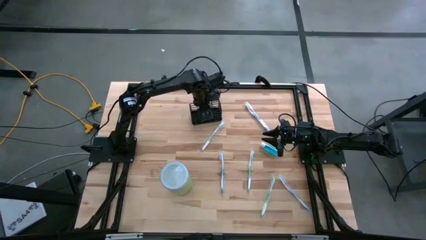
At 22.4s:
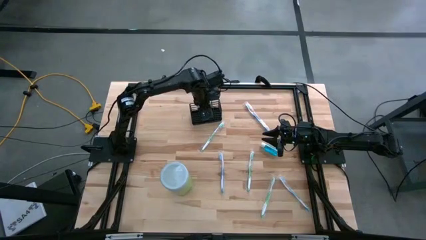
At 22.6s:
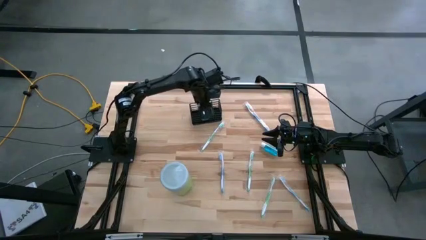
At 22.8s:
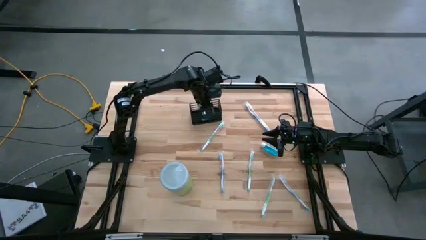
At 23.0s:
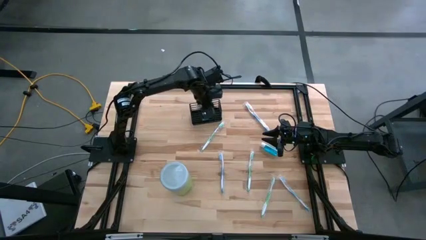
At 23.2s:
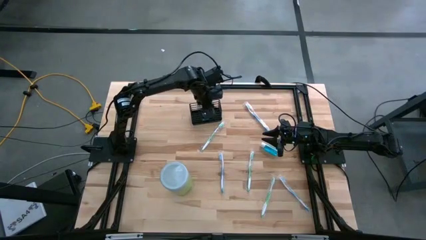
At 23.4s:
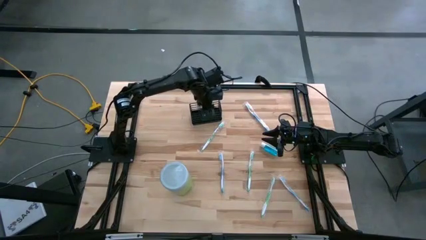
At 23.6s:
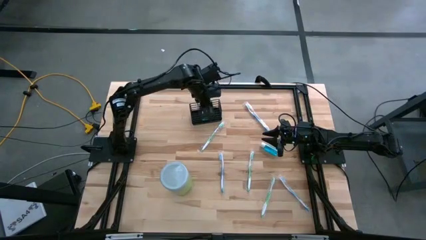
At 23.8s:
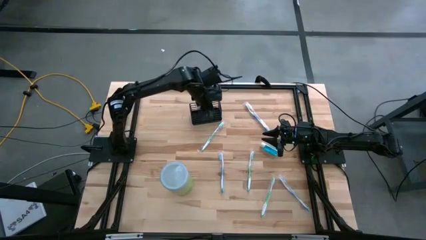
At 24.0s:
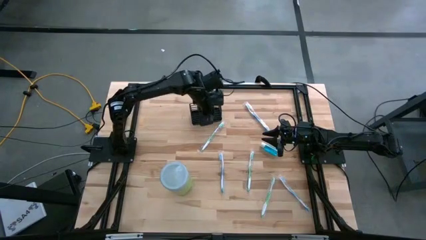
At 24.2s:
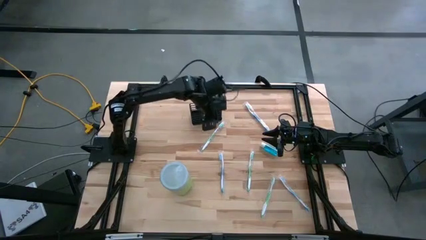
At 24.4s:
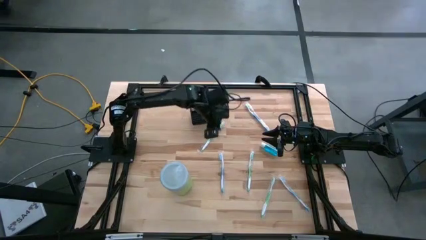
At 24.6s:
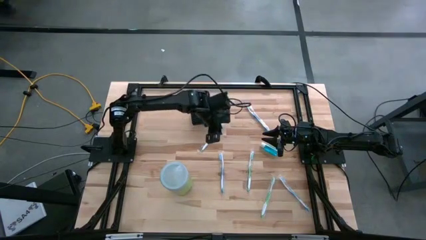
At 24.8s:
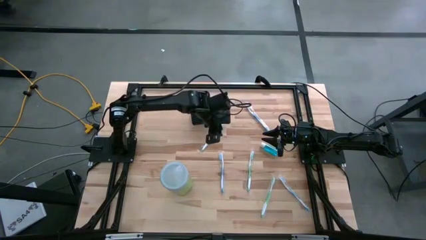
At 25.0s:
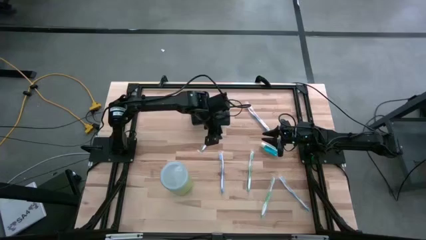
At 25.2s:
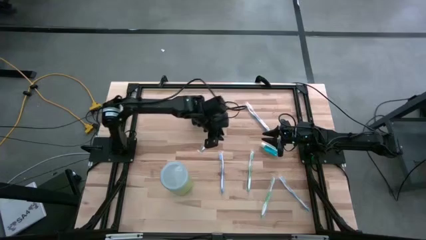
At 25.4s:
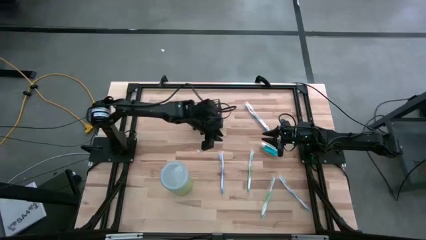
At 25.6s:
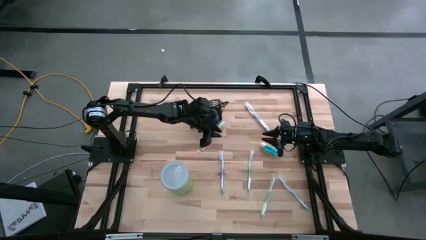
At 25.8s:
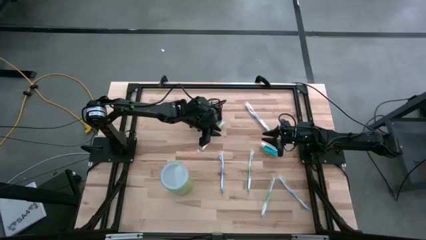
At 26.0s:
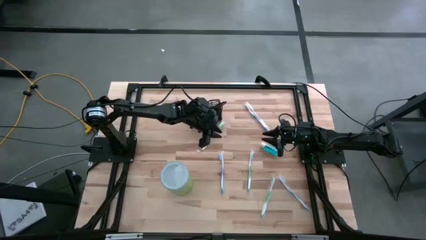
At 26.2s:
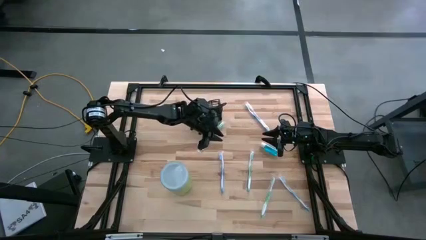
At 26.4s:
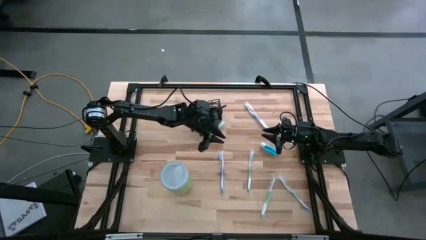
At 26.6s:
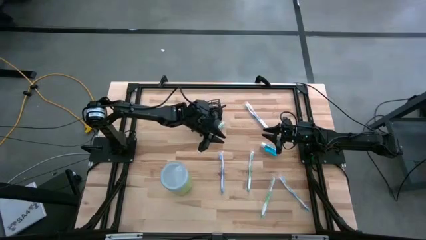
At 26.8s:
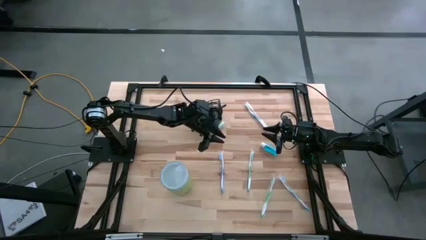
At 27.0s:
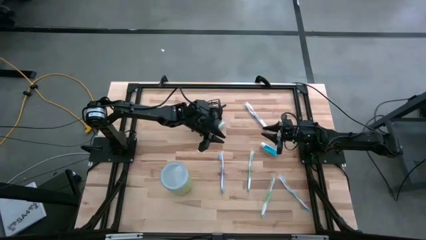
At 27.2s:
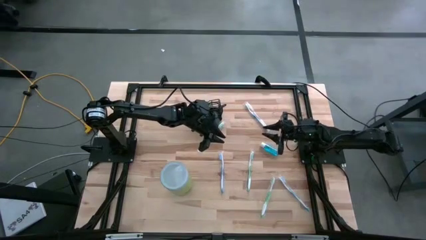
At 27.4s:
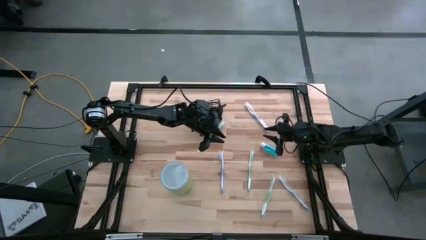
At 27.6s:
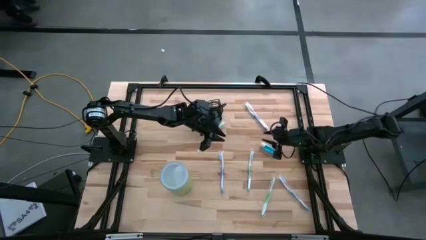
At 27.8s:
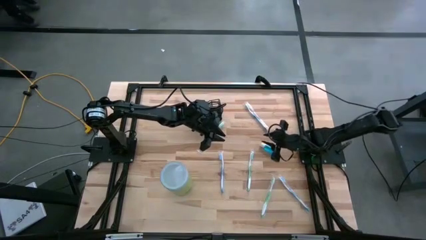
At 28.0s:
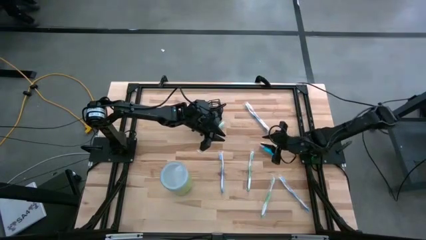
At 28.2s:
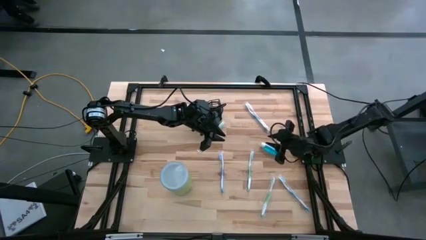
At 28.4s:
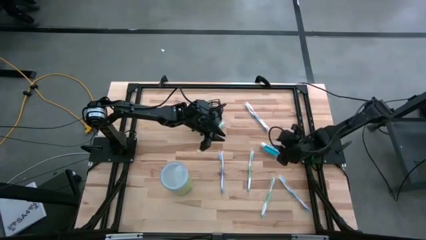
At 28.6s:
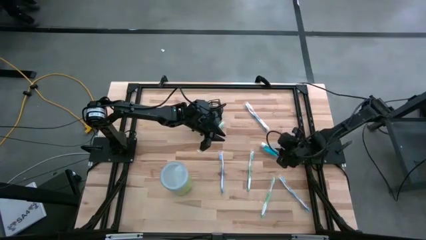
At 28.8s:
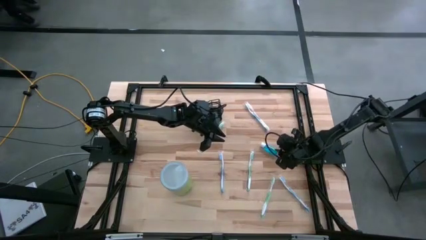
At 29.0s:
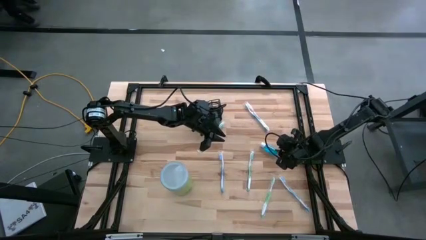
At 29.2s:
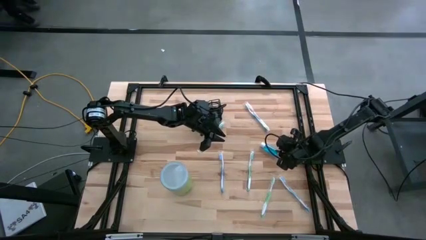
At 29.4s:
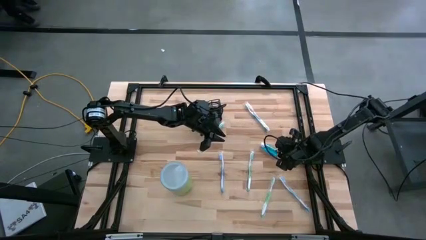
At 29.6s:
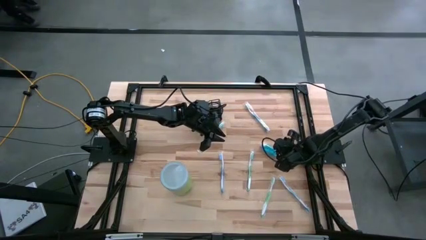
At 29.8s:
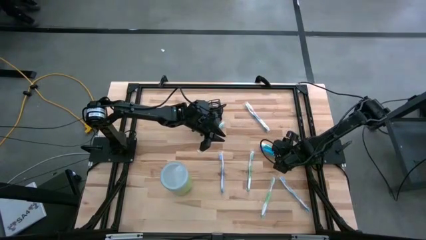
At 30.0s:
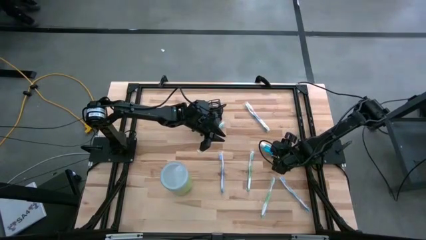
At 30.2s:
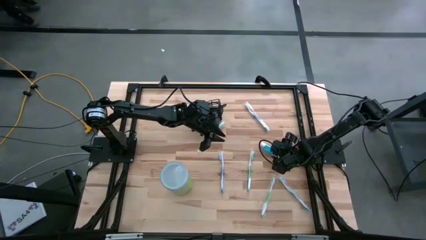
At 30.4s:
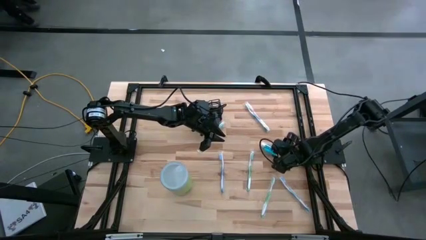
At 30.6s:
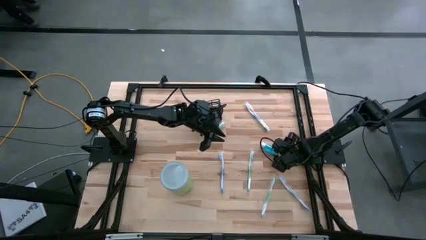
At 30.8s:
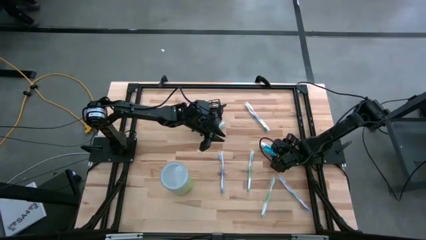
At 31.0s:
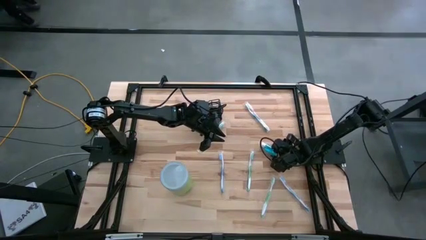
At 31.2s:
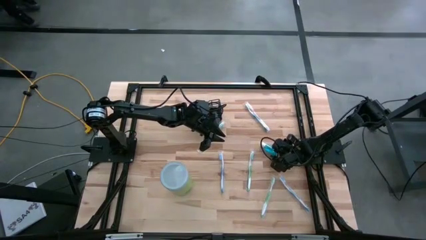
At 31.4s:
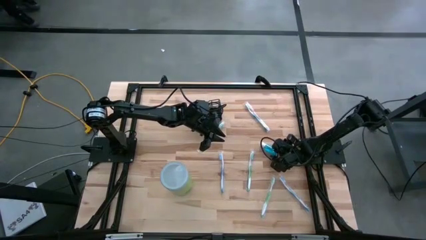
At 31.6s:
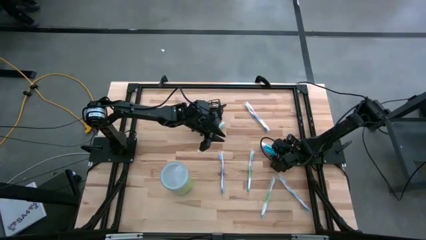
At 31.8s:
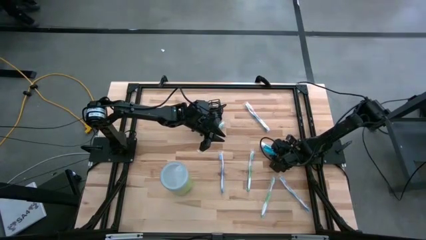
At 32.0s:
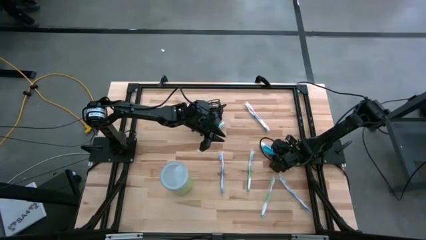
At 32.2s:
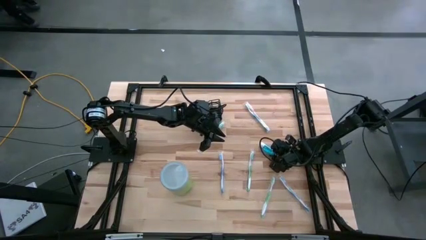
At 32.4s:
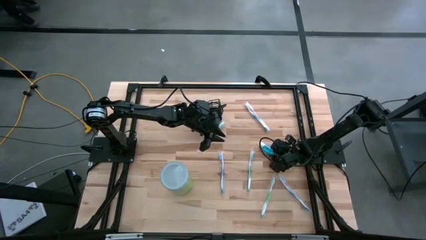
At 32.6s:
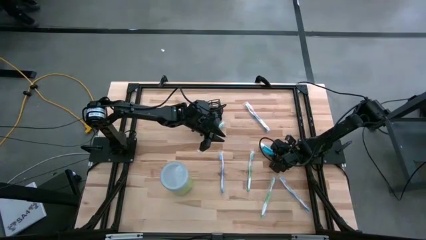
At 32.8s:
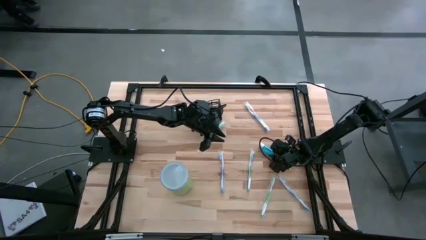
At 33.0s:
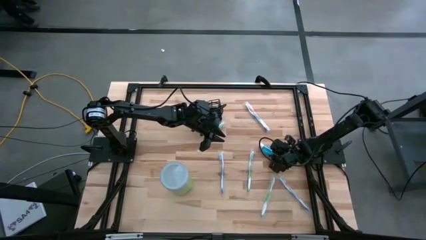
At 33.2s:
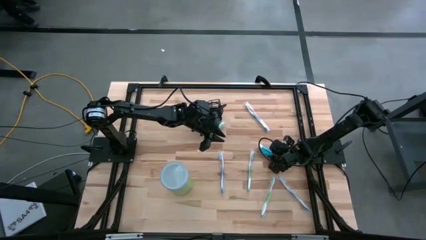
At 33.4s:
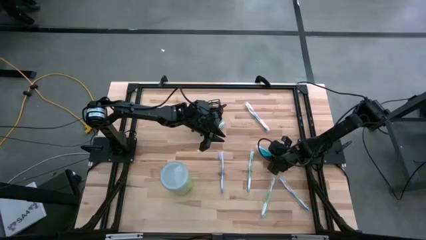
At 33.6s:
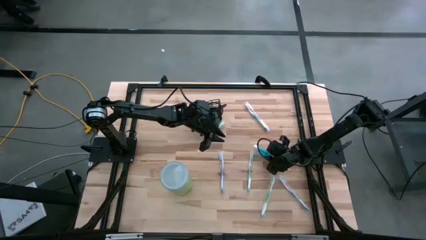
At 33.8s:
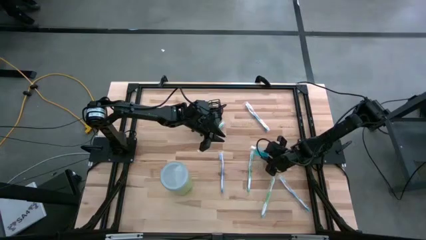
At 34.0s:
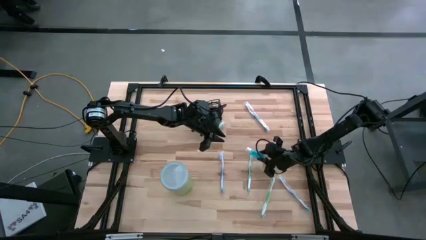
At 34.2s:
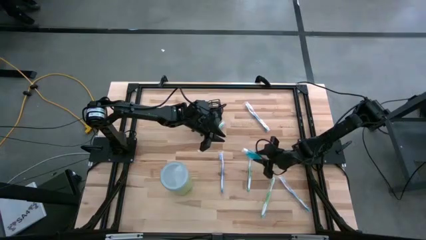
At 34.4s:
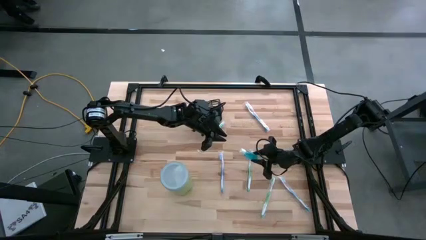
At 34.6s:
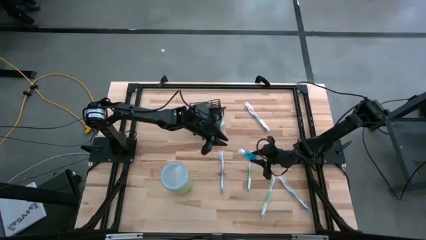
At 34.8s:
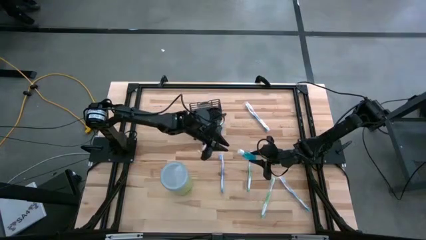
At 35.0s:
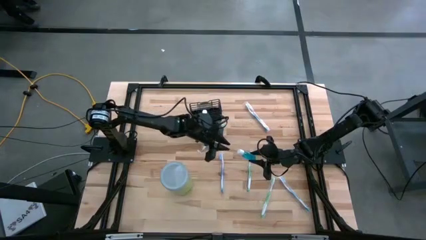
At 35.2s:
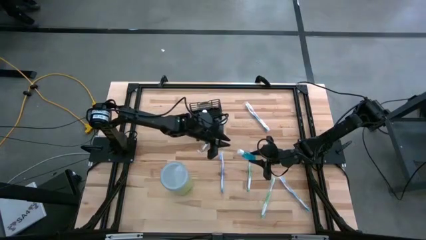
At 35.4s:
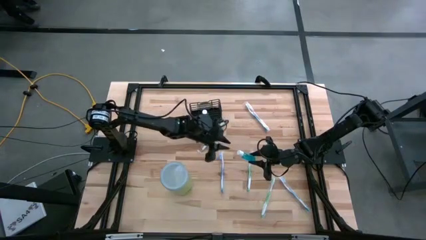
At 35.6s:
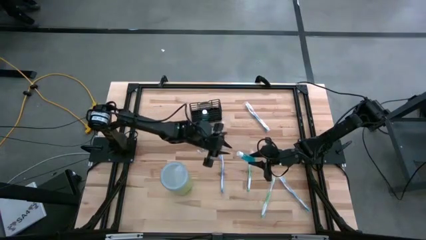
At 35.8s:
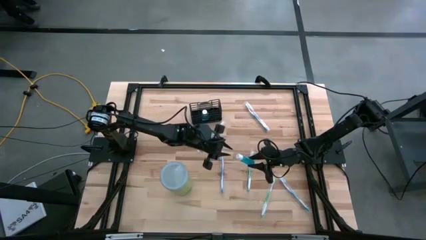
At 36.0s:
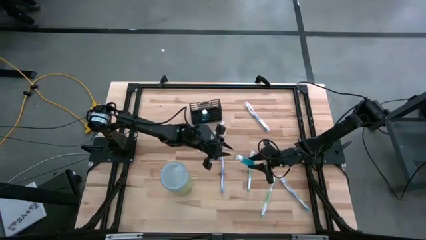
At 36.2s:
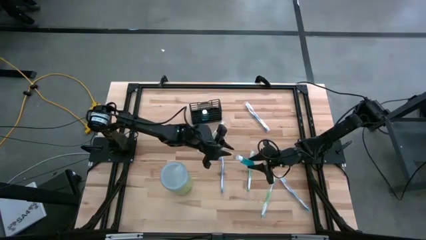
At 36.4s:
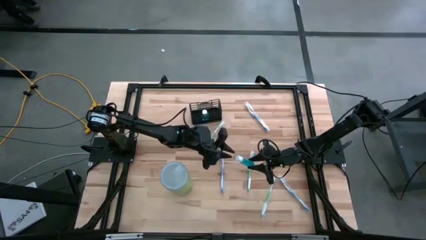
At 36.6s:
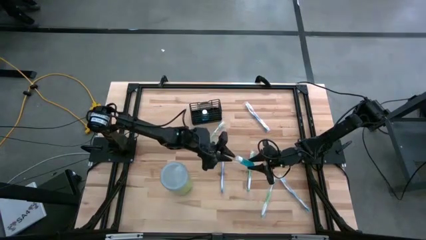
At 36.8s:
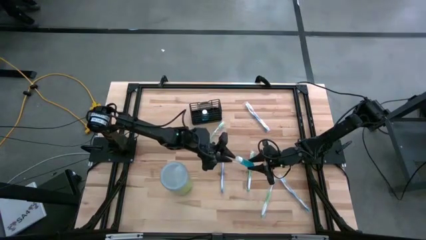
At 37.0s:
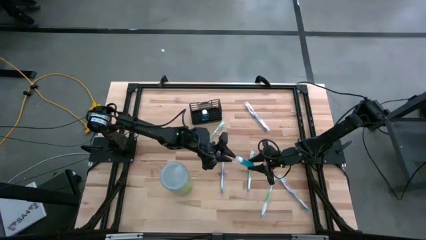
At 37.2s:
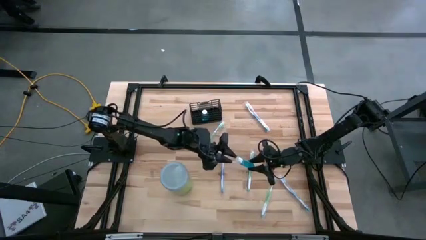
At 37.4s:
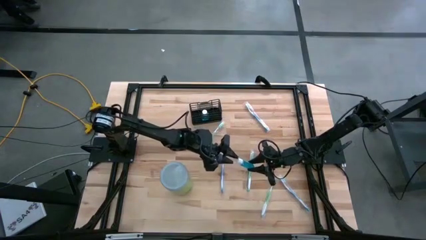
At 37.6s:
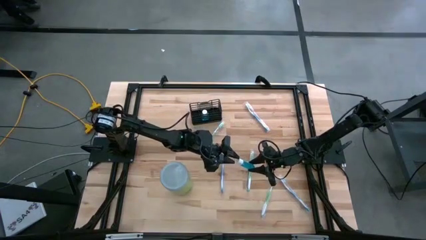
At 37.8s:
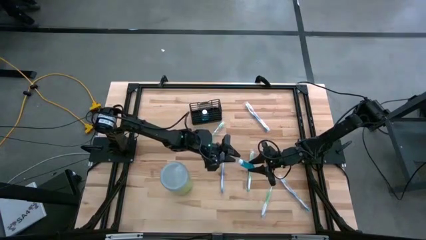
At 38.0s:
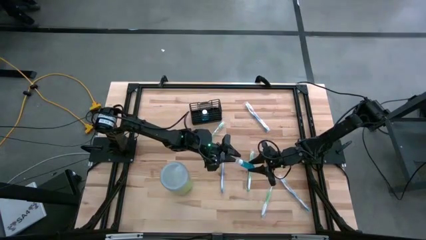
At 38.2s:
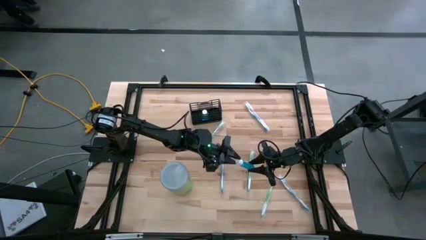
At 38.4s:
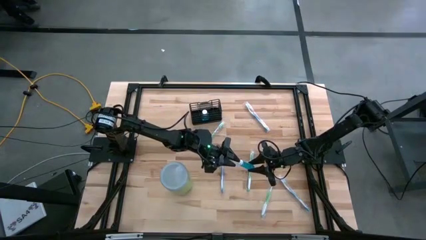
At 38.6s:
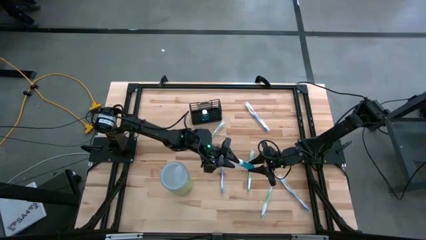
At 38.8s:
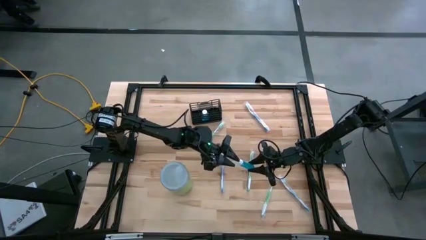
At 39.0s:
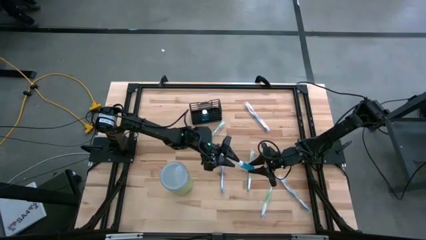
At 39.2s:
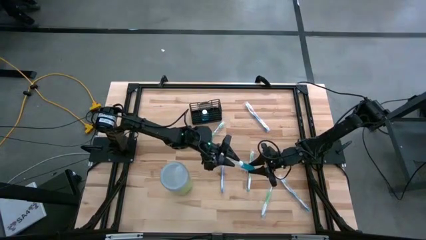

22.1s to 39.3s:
Task: Pick & Place toothbrushing station
Put the blue mouthwash into the black mesh mesh organizer
